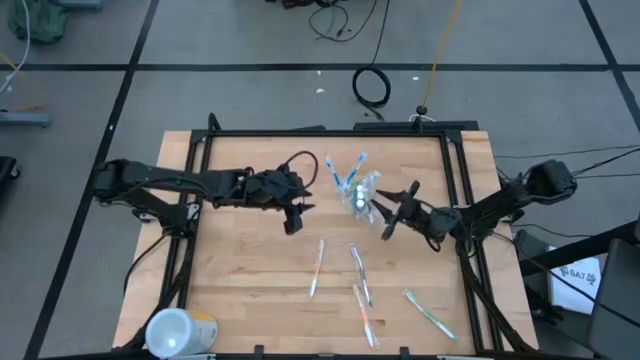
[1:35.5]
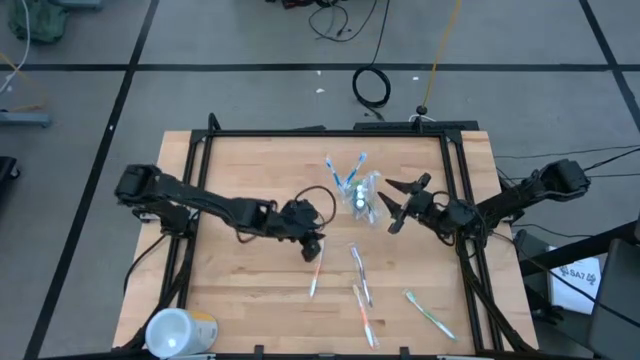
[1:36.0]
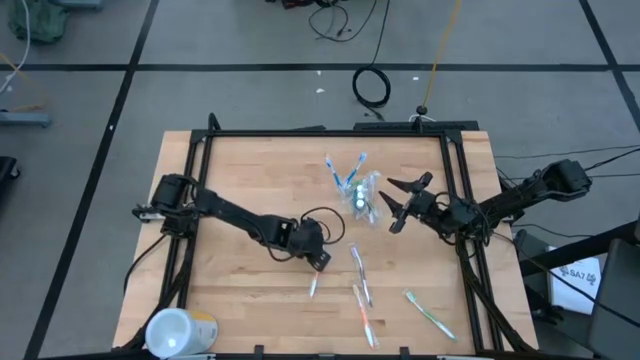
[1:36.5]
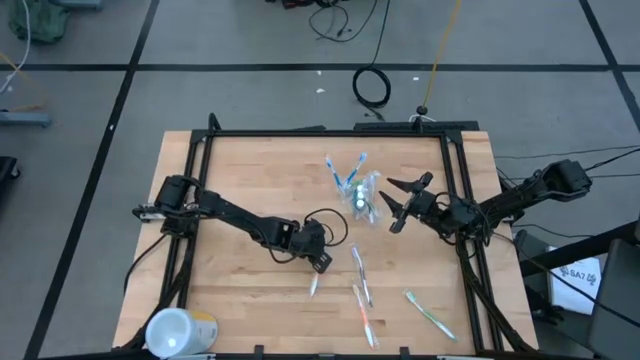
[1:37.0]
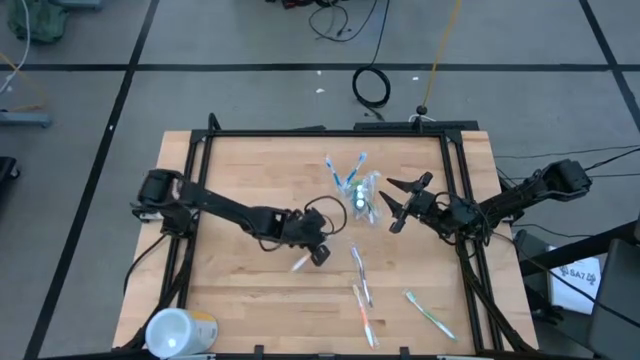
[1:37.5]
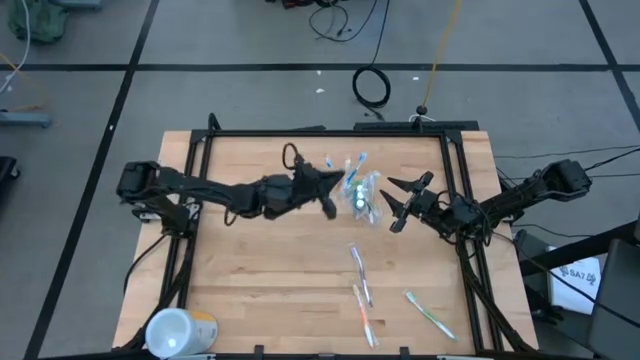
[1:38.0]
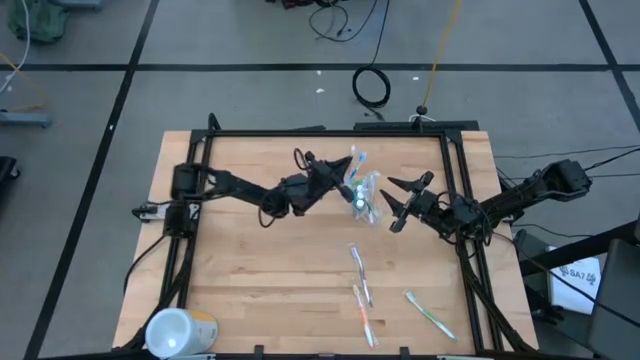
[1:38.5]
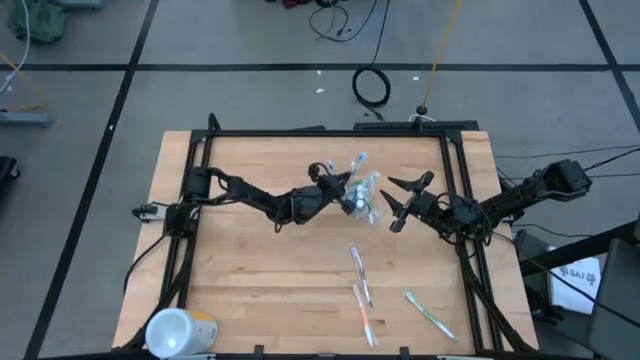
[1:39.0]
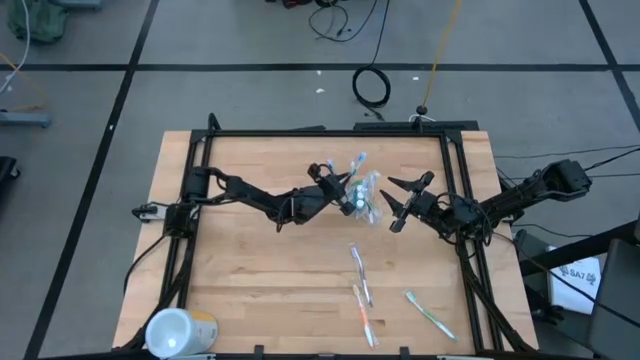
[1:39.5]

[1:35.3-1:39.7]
Task: Pick & Place toothbrushing station
Put the top orange toothbrush into the transparent organizer

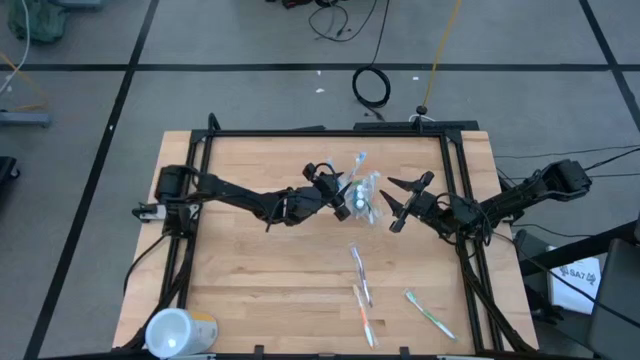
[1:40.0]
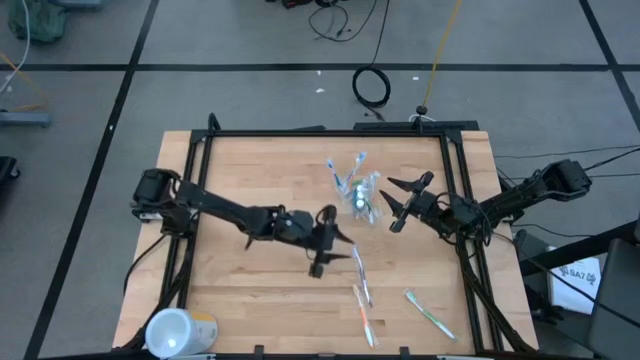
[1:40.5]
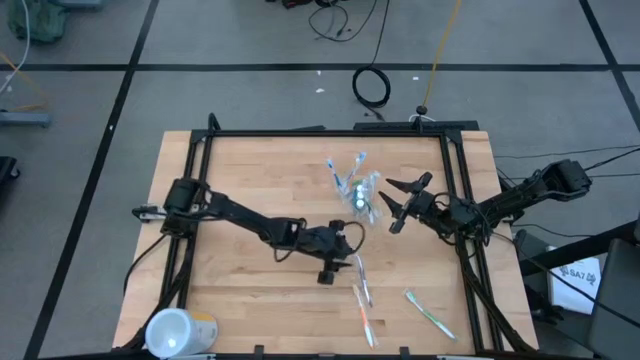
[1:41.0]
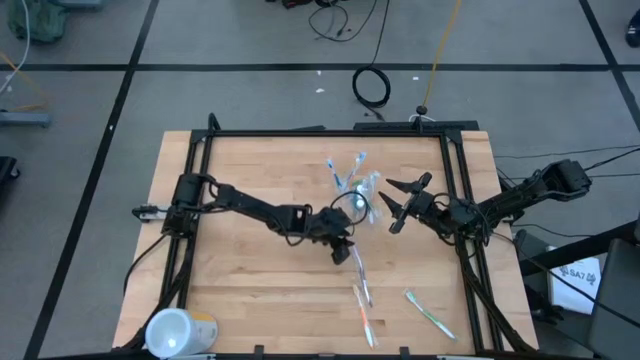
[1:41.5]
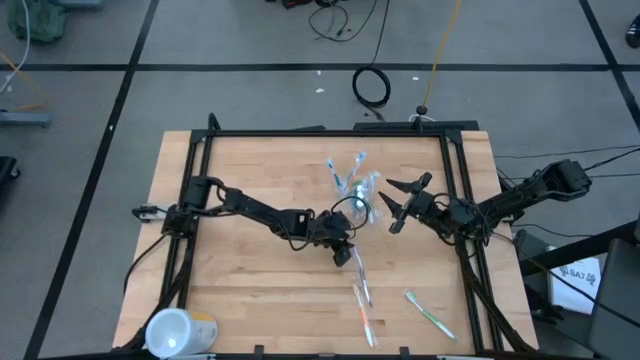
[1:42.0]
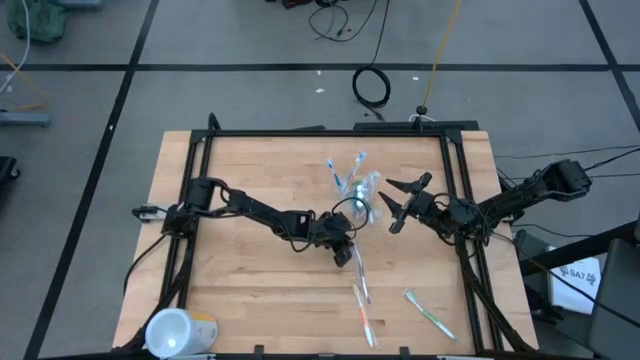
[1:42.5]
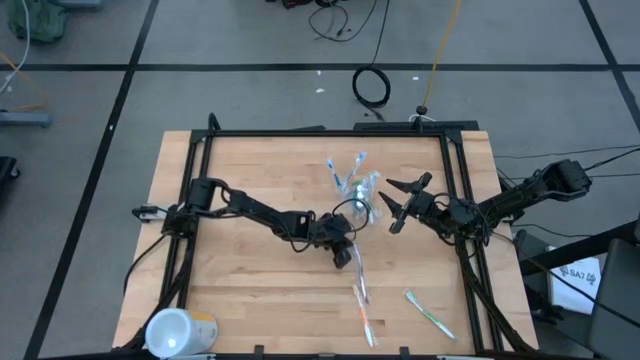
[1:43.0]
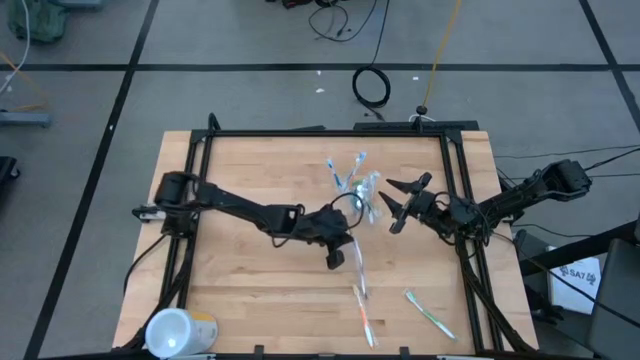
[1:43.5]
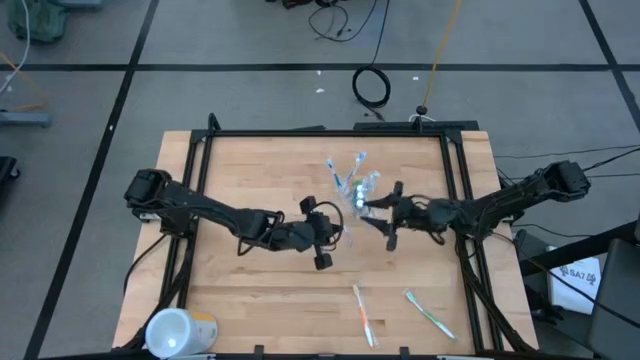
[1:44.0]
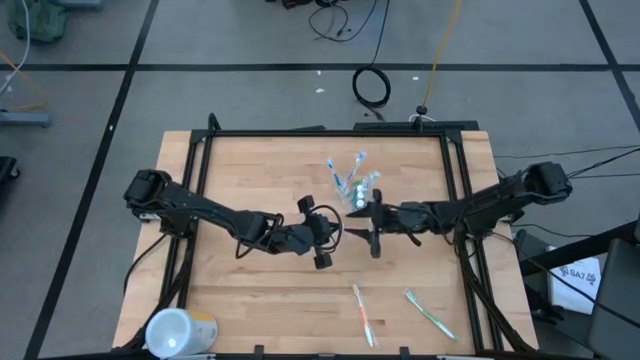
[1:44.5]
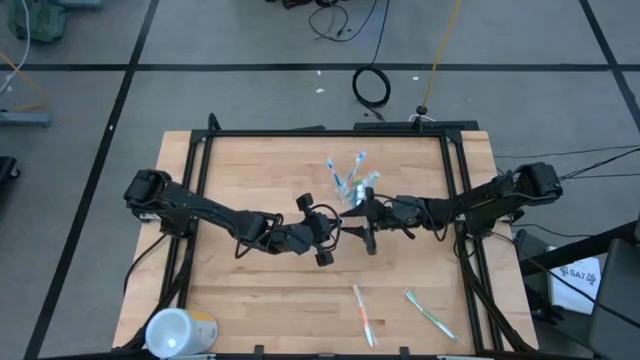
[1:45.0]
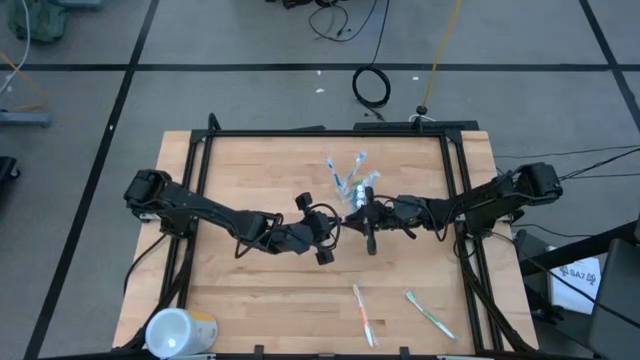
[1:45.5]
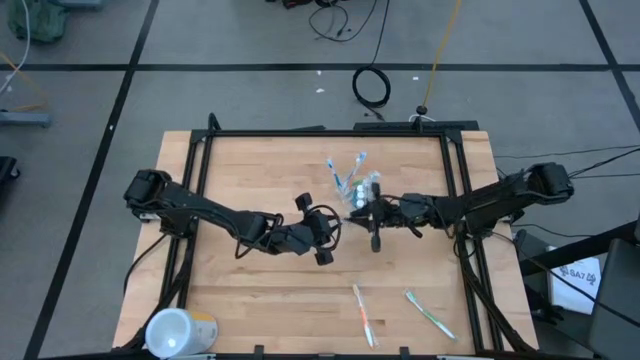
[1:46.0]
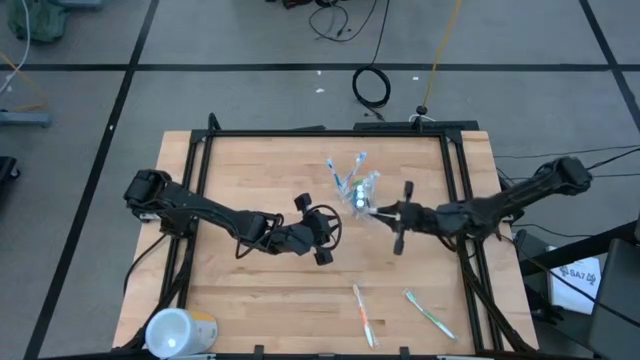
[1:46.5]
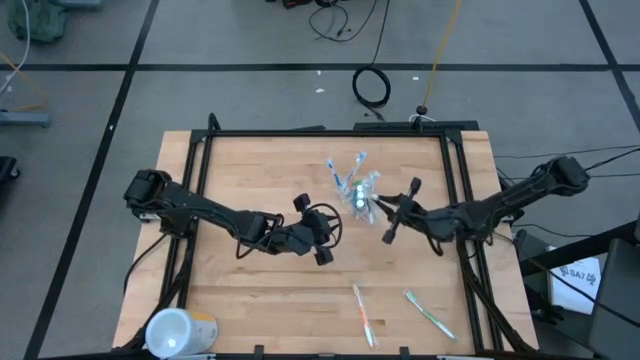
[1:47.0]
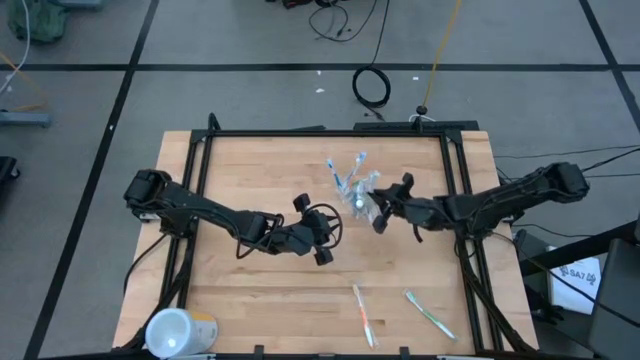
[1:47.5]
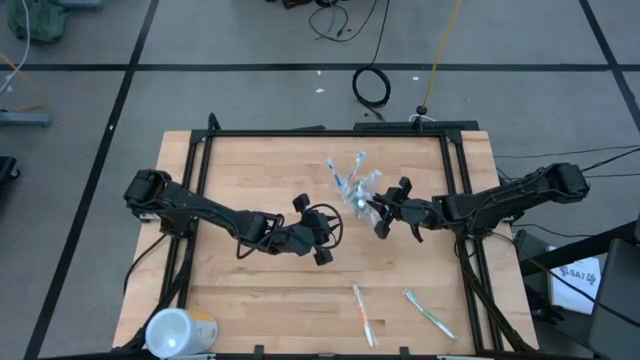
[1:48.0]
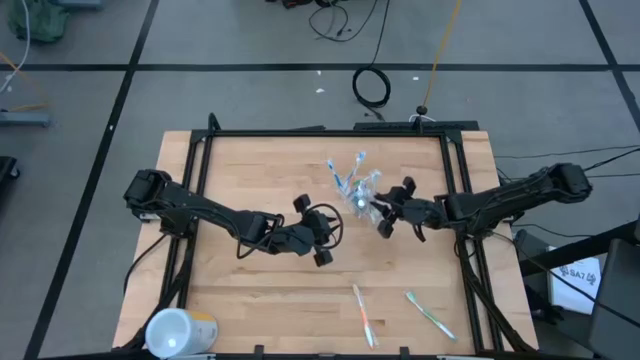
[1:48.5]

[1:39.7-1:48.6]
Put the violet toothbrush into the transparent organizer

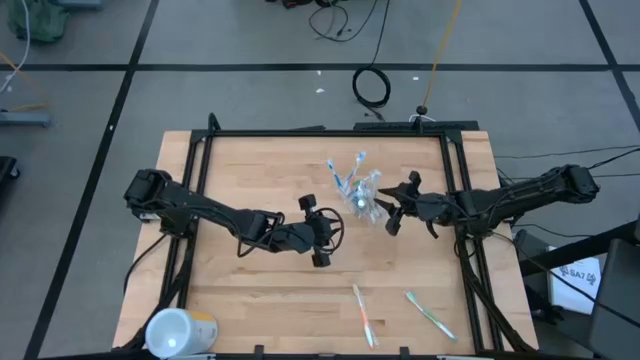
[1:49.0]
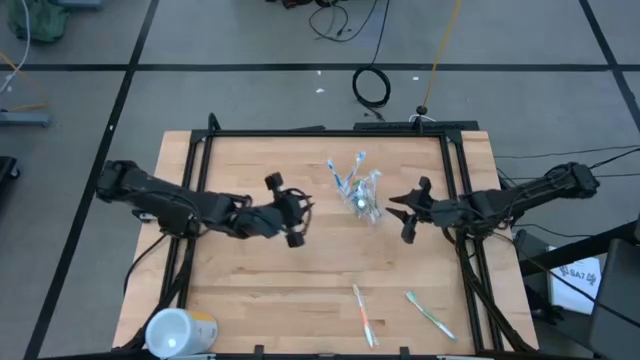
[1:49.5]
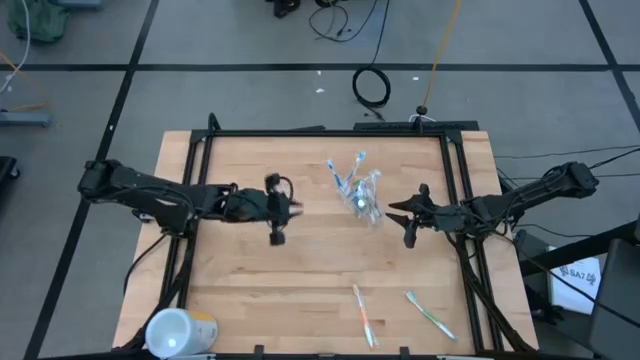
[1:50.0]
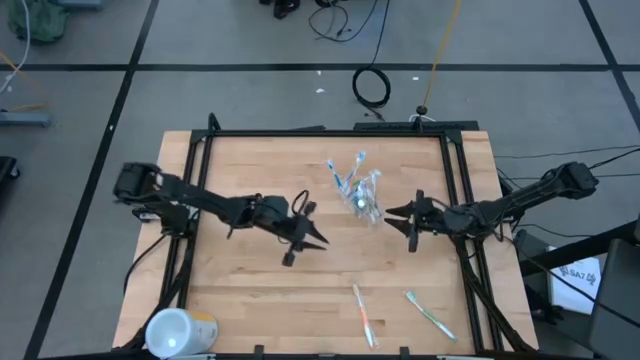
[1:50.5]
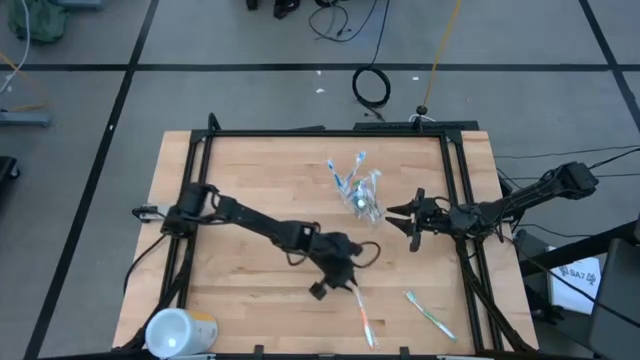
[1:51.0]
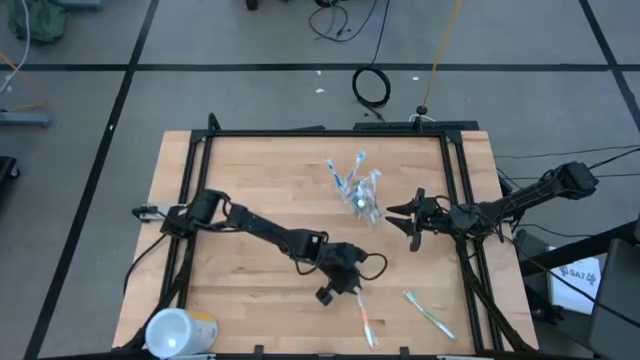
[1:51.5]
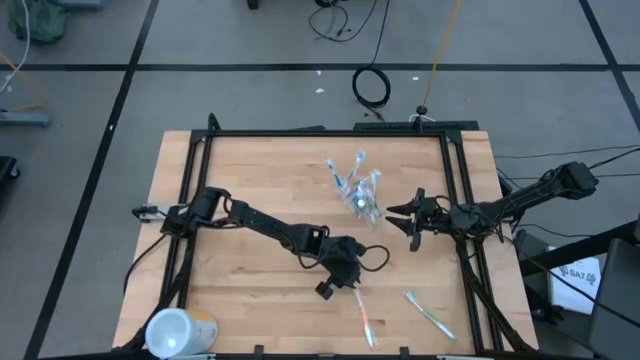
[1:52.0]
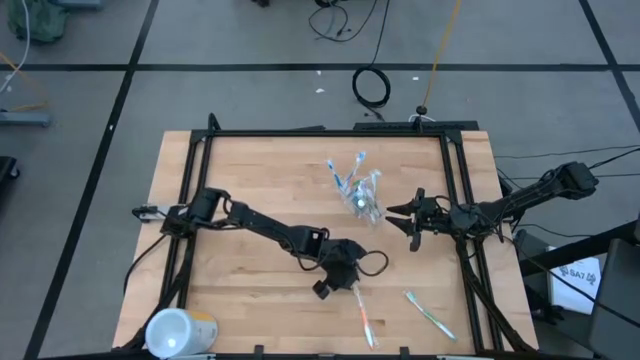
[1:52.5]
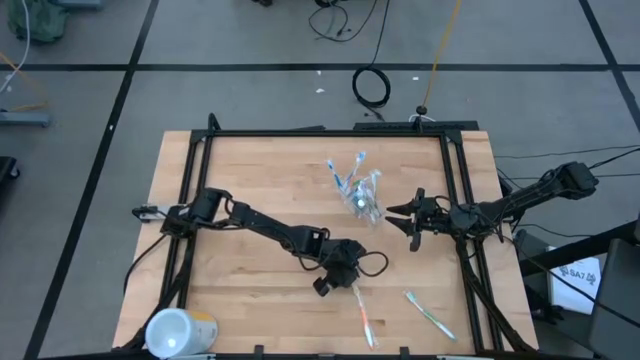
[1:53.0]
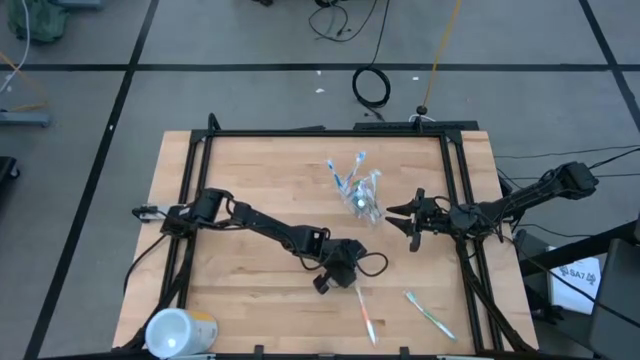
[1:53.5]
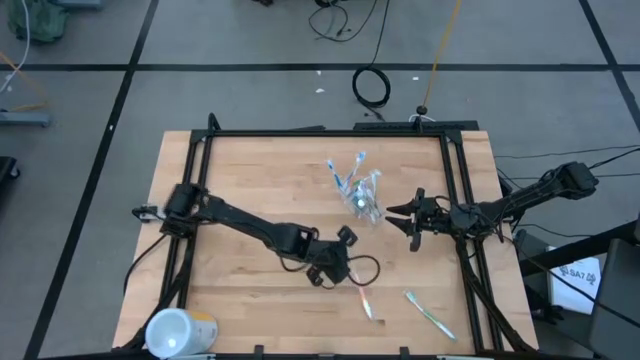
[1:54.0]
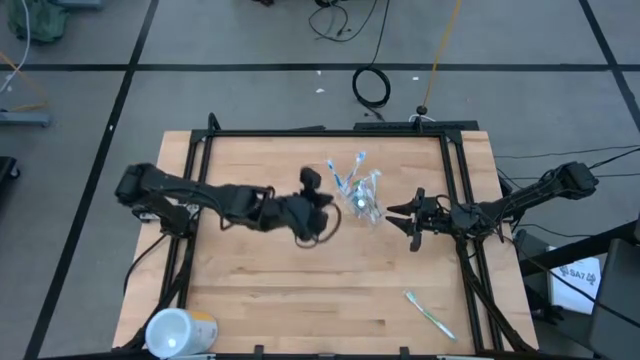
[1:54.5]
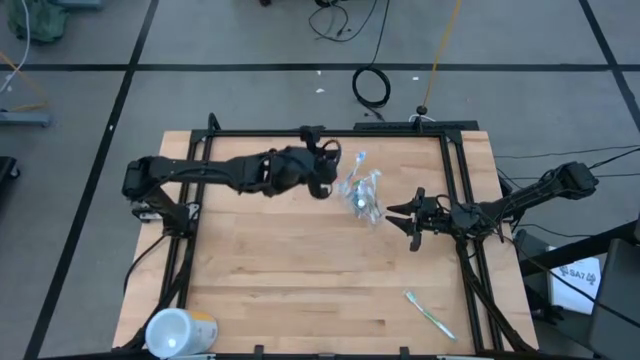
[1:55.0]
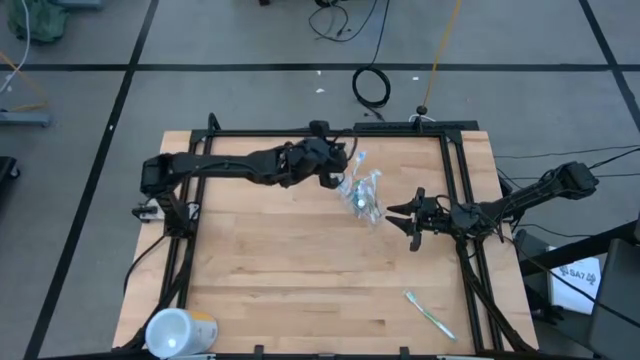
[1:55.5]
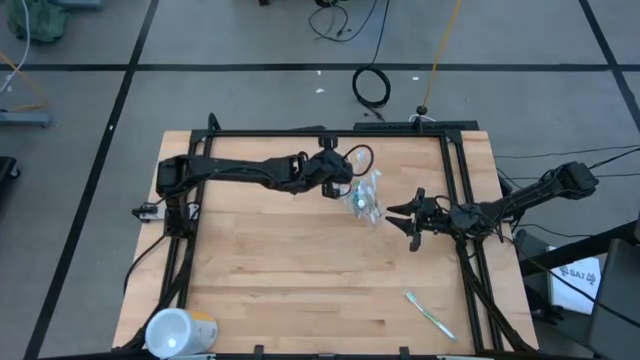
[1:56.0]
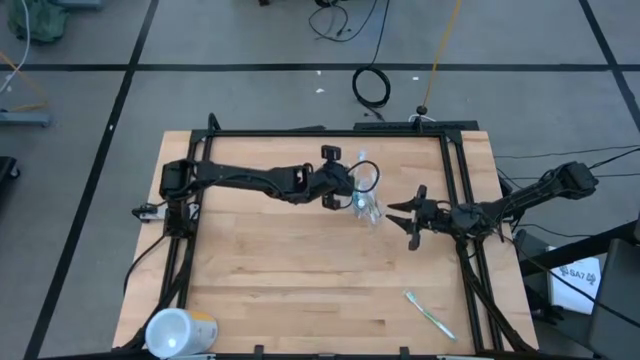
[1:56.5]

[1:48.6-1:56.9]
Put the orange toothbrush into the transparent organizer
